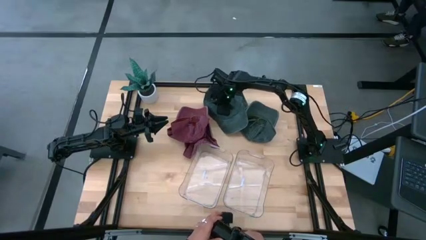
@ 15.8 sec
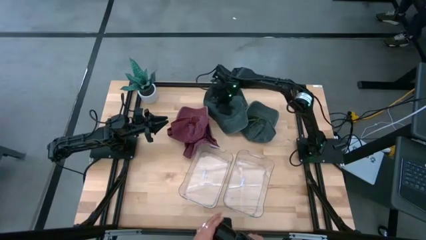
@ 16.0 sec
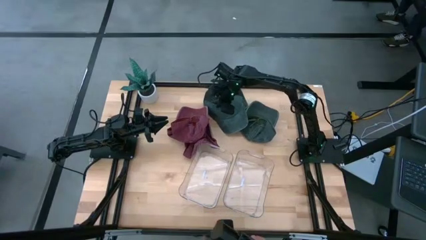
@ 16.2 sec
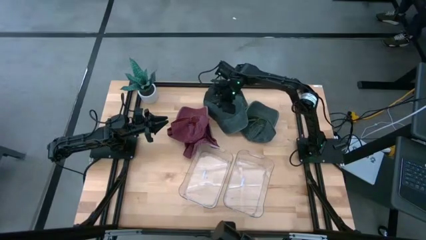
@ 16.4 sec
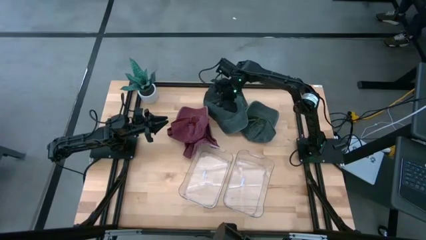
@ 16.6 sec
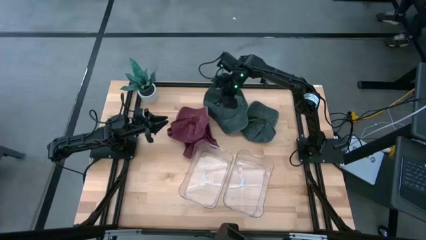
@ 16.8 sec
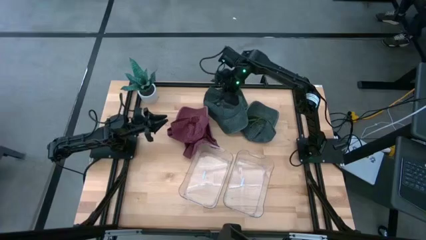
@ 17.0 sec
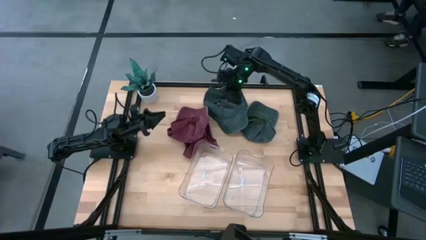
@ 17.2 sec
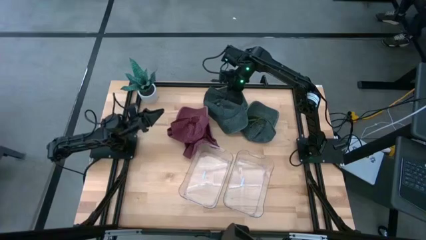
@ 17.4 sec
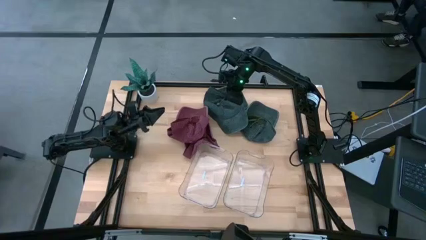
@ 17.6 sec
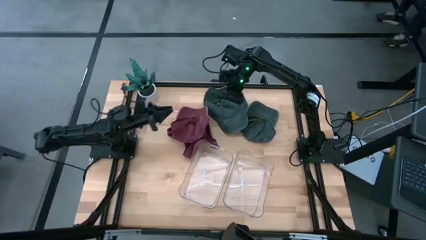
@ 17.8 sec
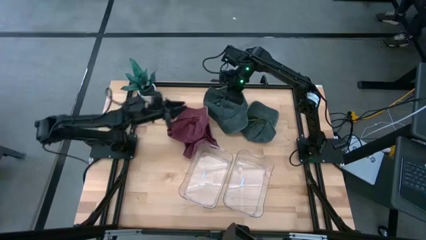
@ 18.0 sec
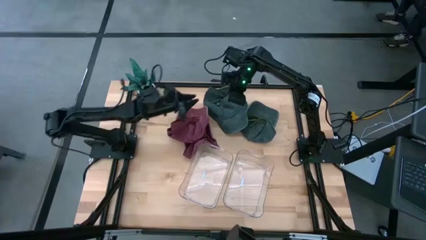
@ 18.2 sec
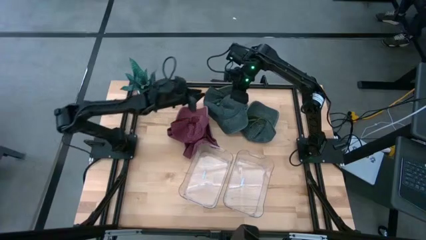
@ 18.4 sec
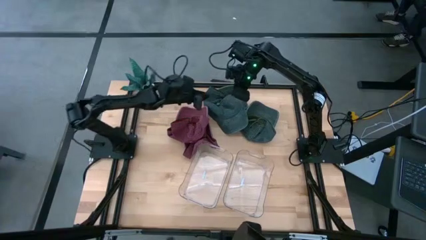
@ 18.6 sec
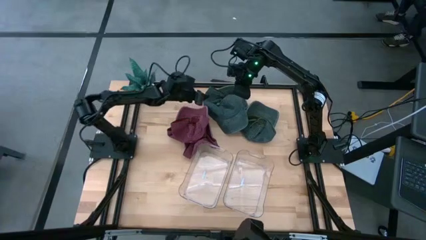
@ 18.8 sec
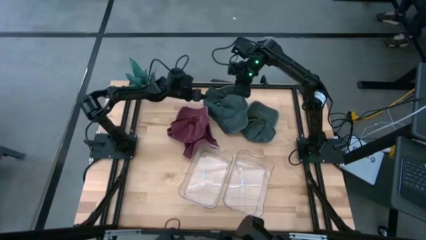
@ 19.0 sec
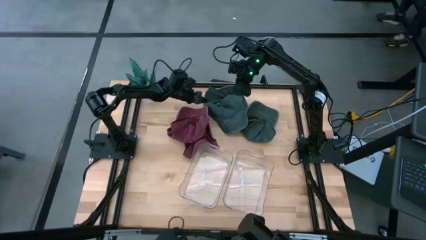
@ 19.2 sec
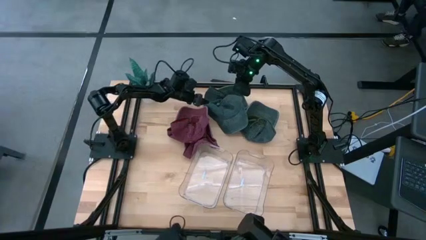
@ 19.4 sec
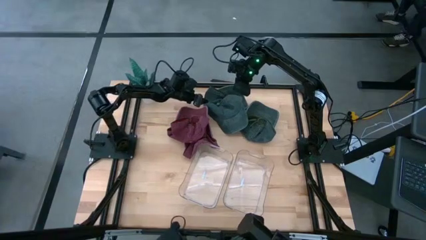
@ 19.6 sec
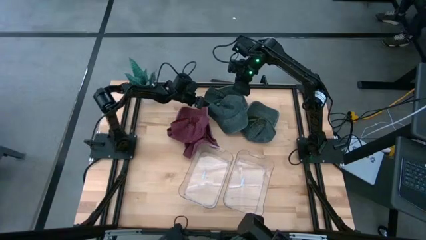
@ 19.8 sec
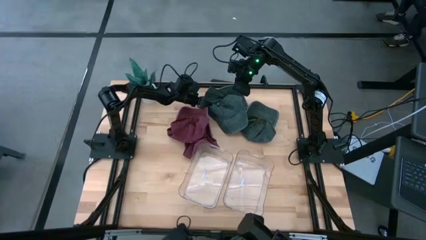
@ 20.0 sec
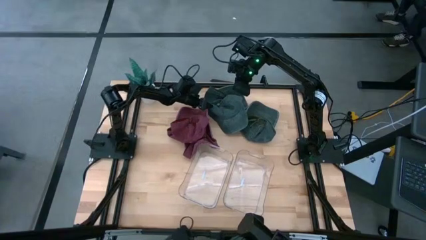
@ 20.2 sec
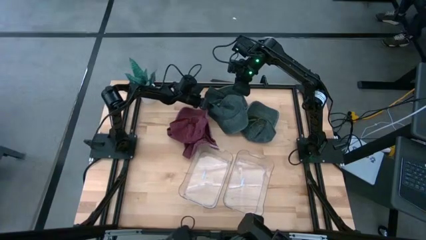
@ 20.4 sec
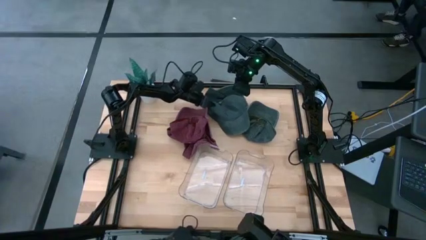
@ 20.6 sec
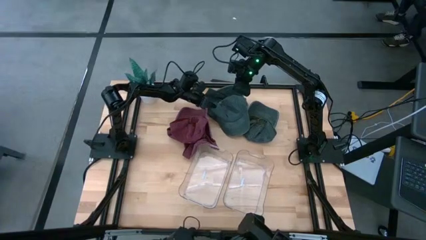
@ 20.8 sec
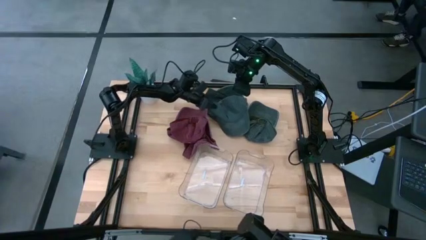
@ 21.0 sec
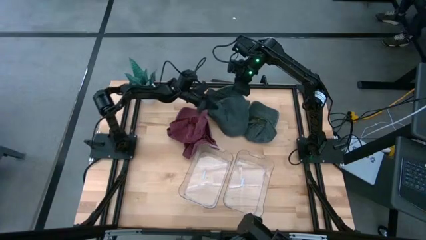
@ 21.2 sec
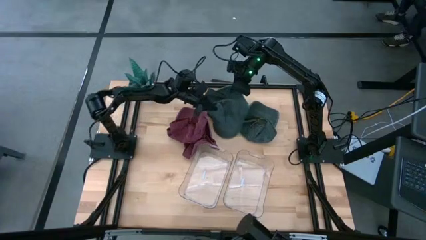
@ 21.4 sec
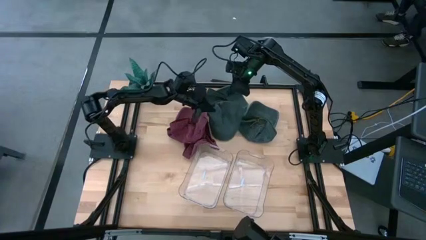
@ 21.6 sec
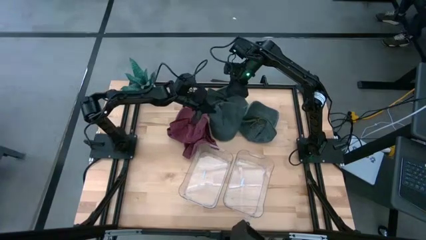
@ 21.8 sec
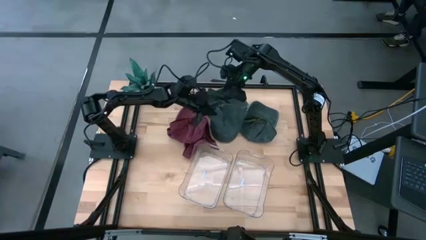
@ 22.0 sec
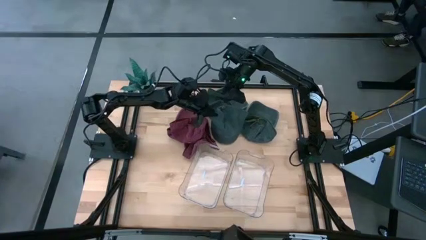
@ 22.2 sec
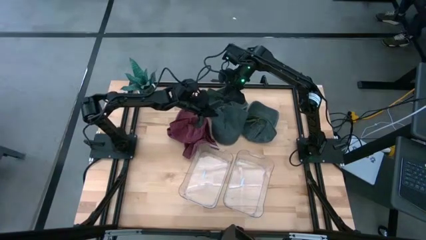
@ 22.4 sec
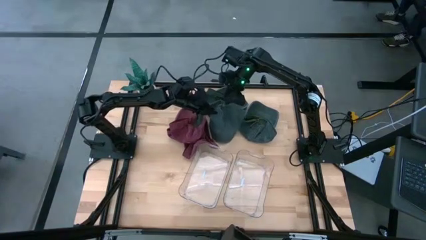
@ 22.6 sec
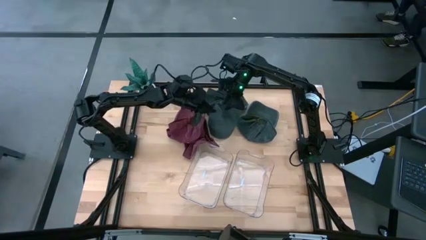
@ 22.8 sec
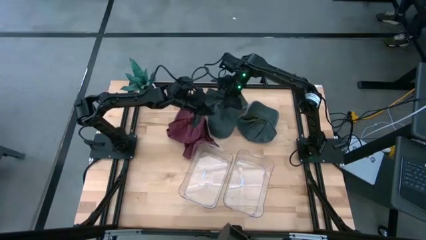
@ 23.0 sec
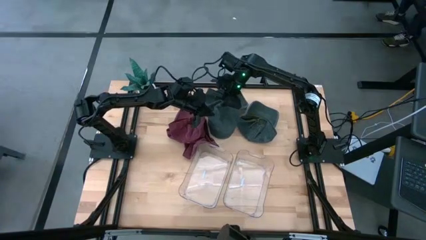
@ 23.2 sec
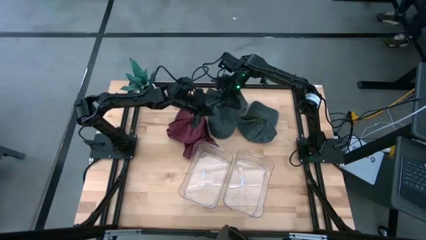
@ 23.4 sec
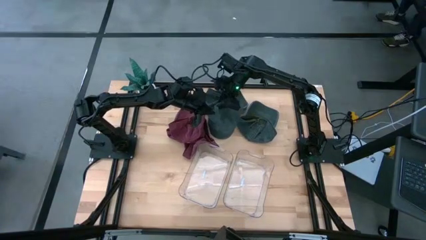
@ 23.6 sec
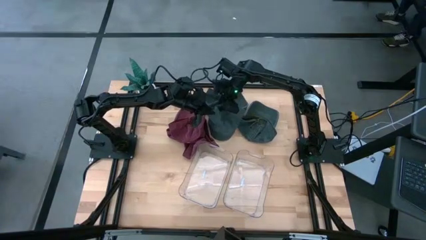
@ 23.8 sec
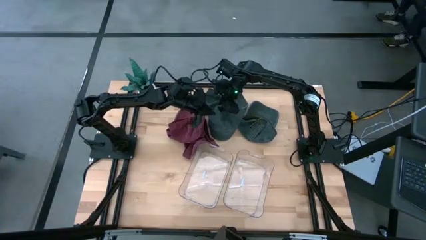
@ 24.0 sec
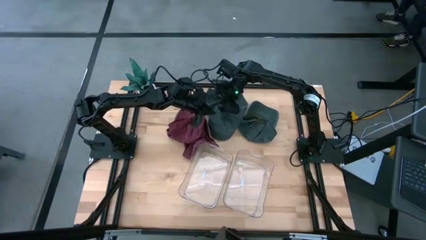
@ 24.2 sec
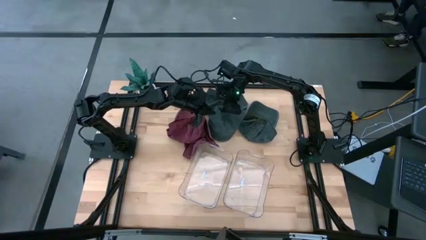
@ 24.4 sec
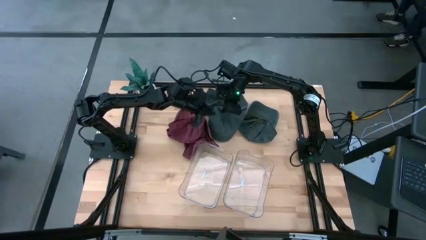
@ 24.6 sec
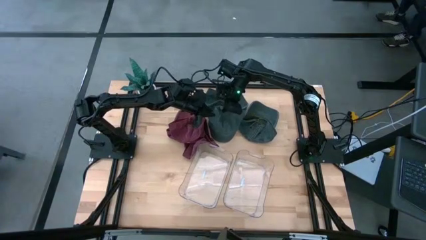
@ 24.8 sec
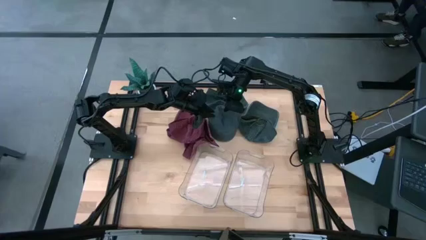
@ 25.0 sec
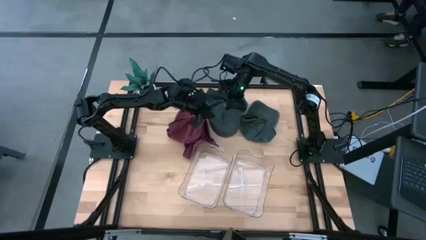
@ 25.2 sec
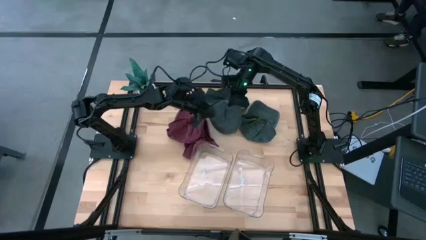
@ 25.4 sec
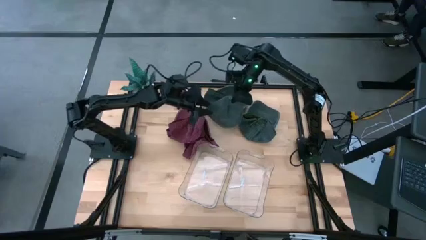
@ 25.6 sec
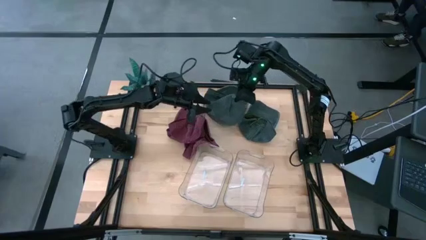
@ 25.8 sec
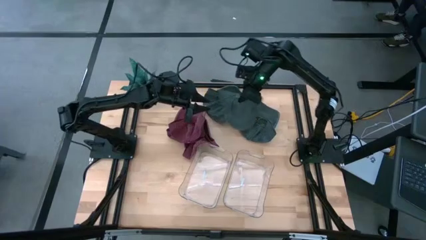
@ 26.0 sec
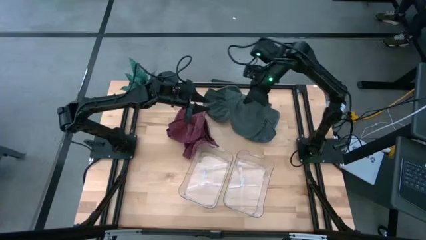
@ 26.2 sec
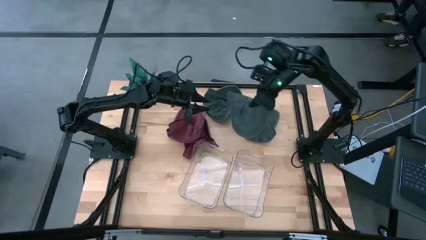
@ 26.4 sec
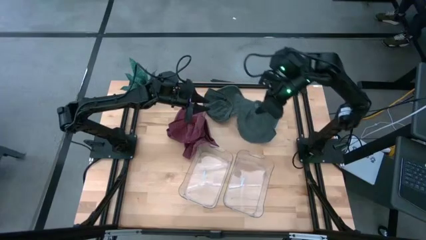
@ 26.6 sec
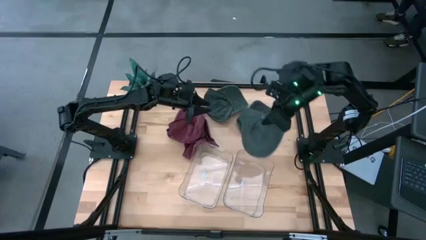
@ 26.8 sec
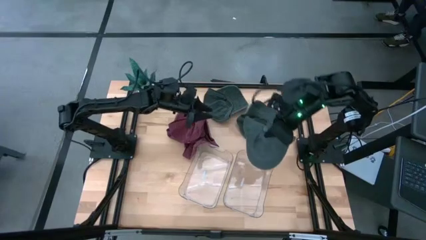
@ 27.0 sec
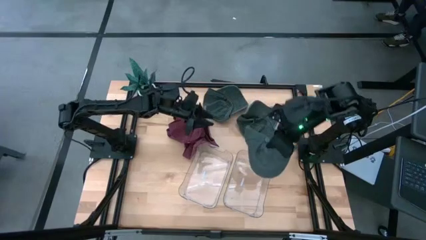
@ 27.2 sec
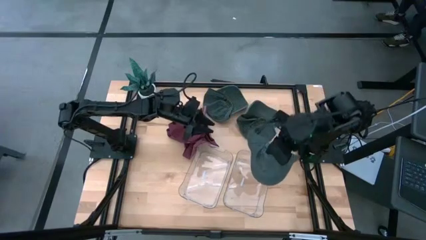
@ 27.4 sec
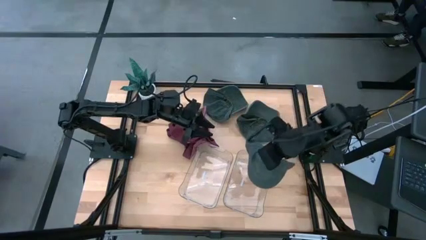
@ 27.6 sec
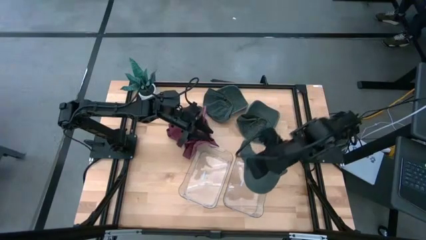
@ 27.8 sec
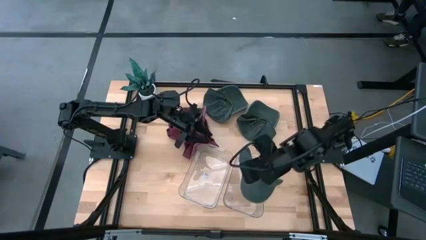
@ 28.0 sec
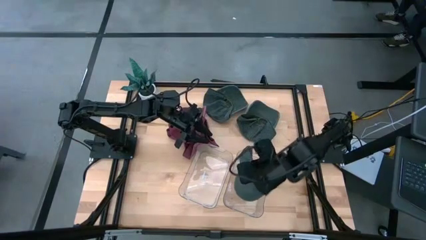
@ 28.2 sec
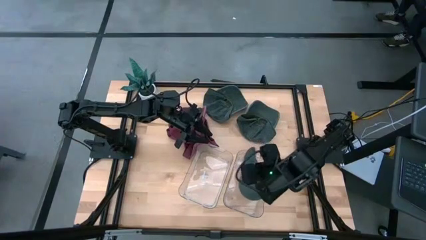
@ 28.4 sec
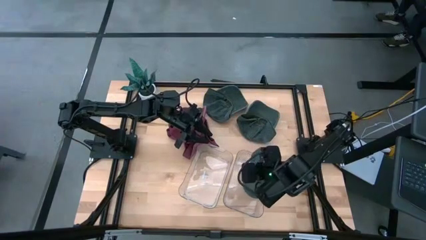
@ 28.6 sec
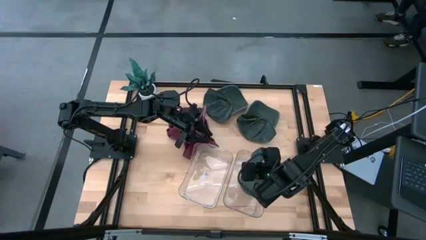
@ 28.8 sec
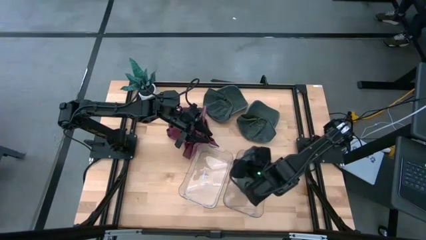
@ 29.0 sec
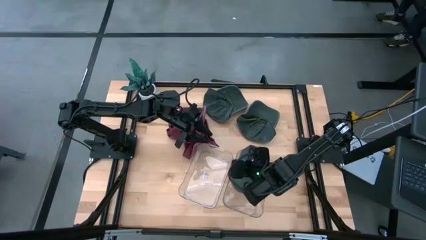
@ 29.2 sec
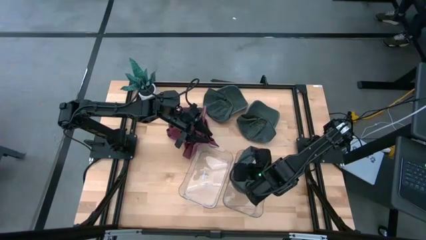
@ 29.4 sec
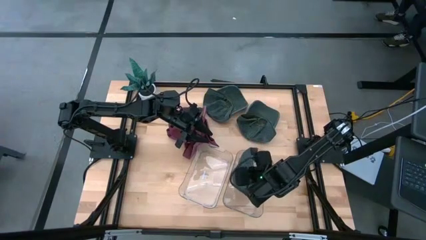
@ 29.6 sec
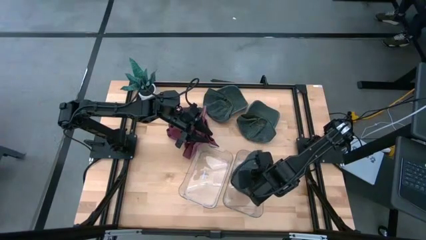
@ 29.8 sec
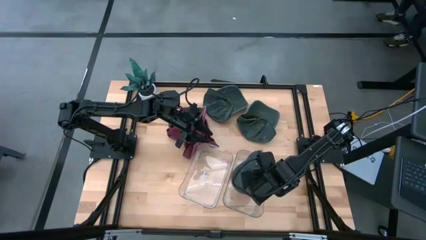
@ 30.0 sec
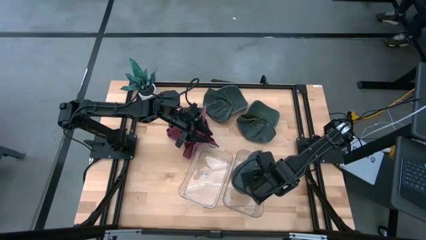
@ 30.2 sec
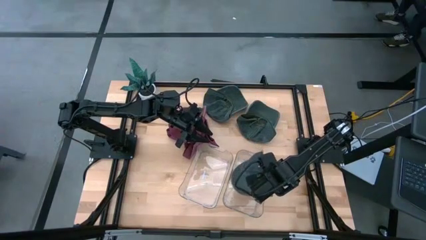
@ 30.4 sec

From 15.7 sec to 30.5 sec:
Task: Pick & Place hat
Put the top gray cap into the right transparent bin
